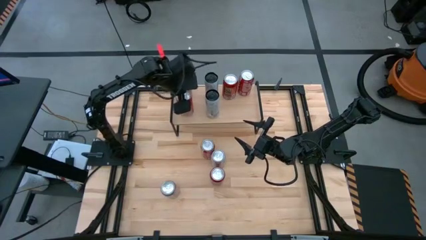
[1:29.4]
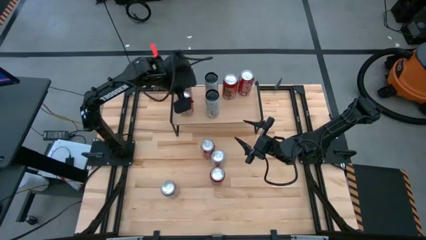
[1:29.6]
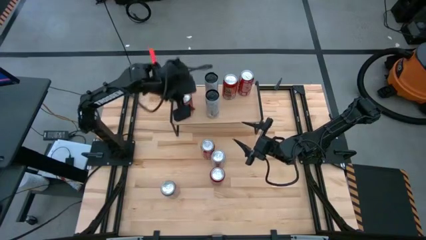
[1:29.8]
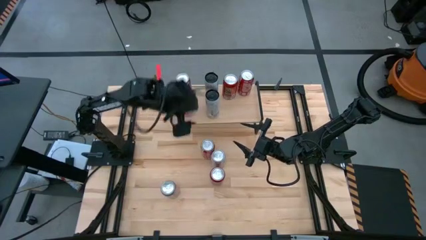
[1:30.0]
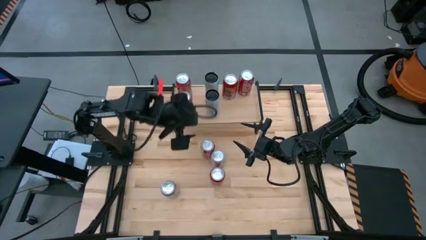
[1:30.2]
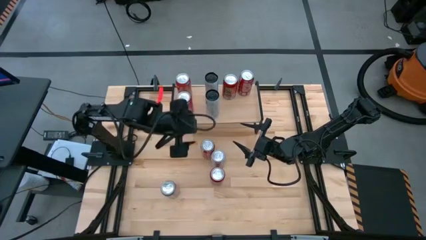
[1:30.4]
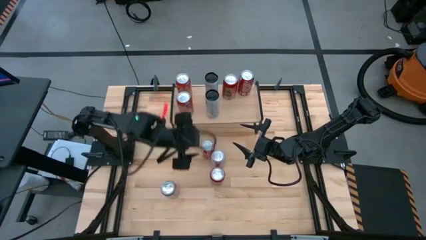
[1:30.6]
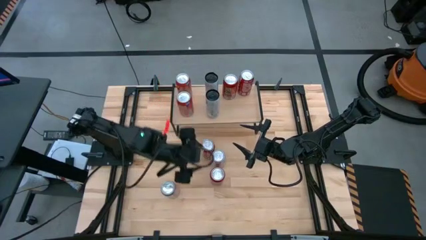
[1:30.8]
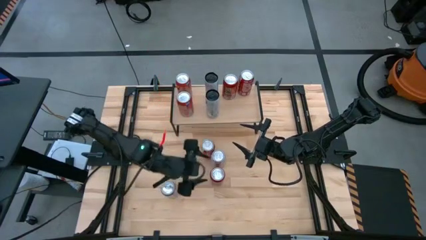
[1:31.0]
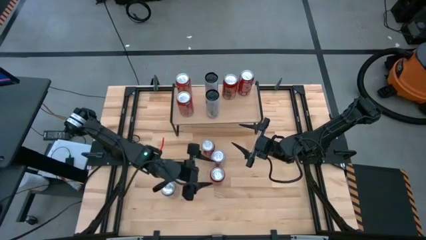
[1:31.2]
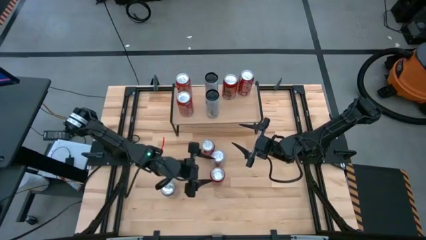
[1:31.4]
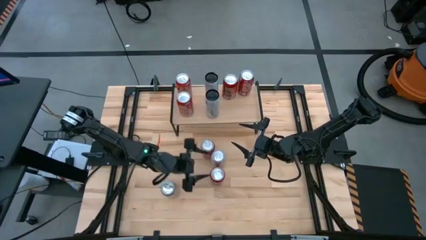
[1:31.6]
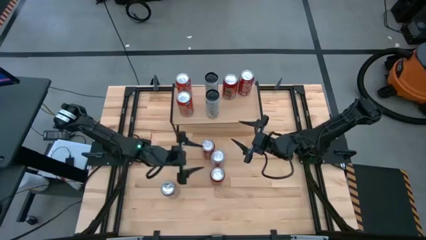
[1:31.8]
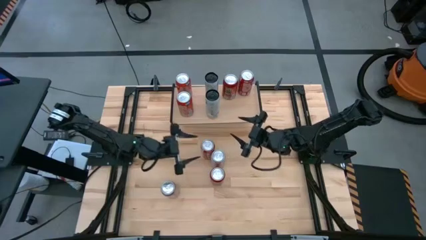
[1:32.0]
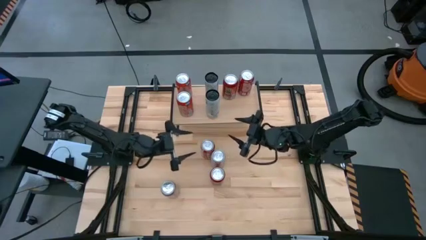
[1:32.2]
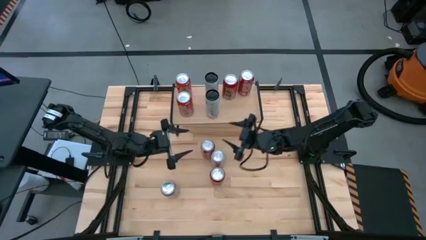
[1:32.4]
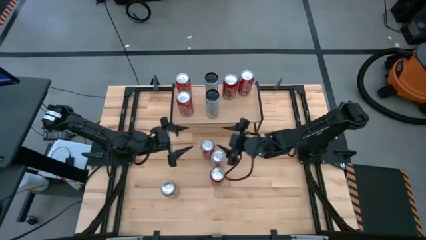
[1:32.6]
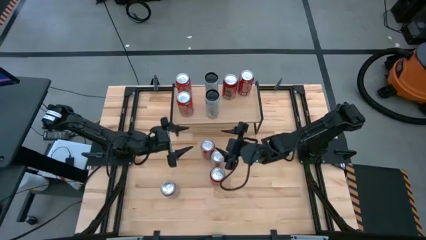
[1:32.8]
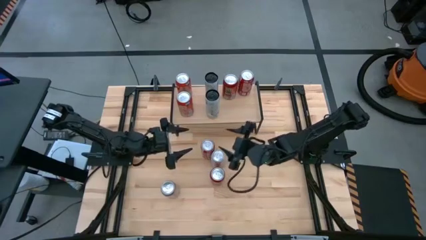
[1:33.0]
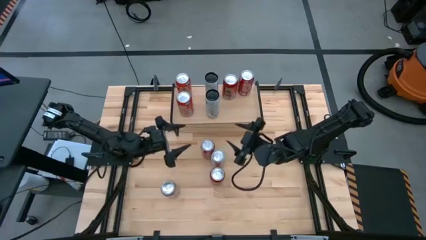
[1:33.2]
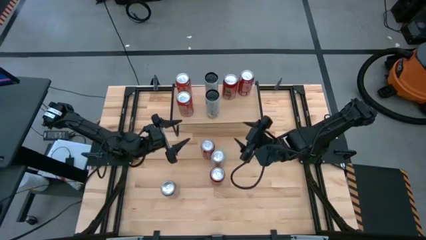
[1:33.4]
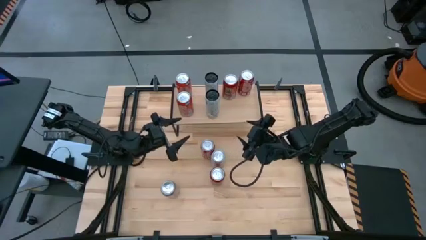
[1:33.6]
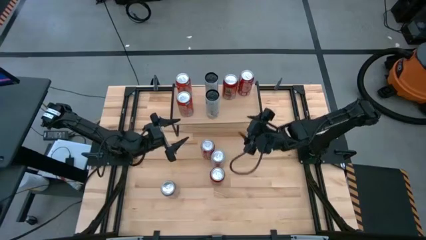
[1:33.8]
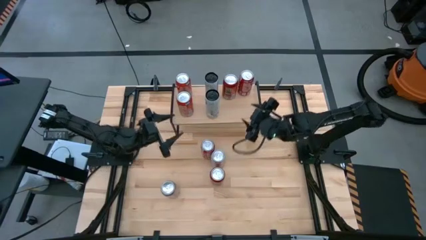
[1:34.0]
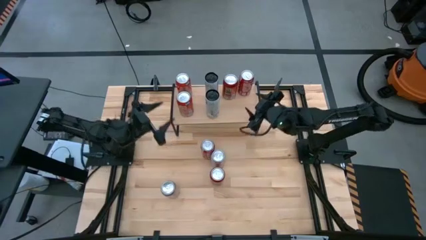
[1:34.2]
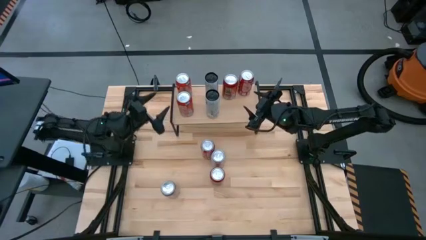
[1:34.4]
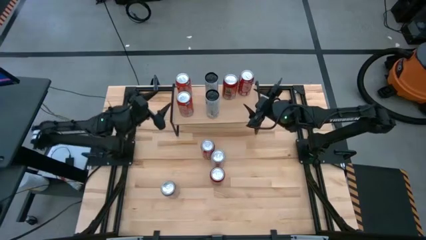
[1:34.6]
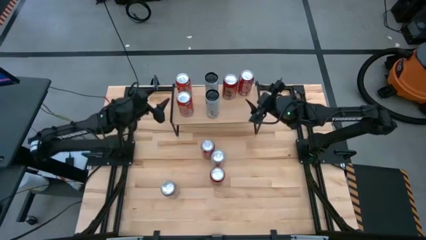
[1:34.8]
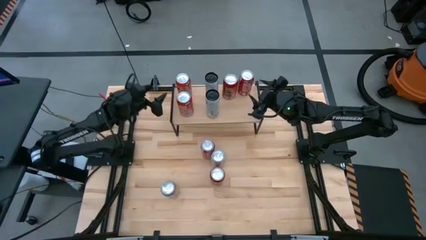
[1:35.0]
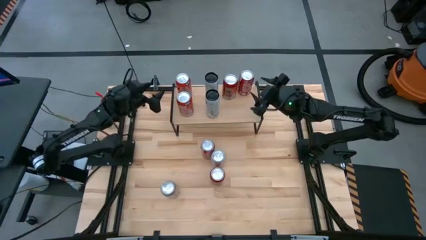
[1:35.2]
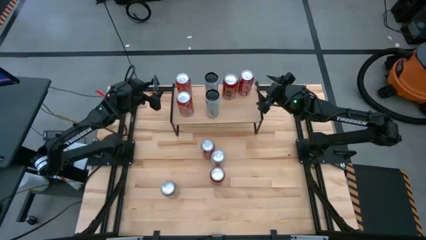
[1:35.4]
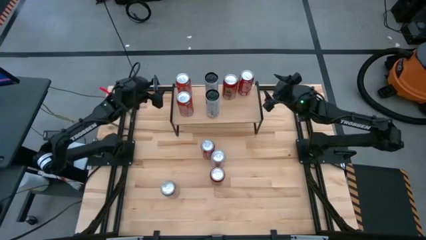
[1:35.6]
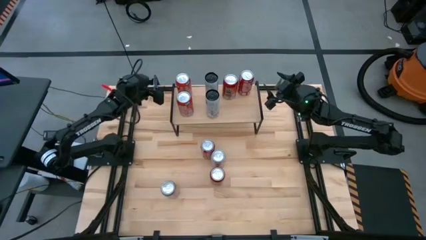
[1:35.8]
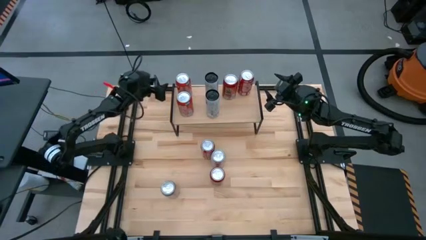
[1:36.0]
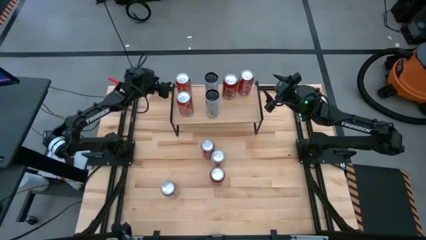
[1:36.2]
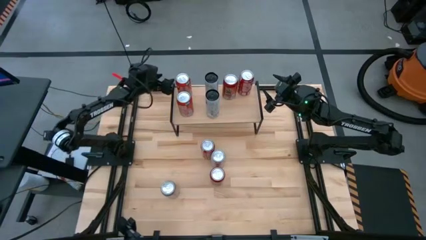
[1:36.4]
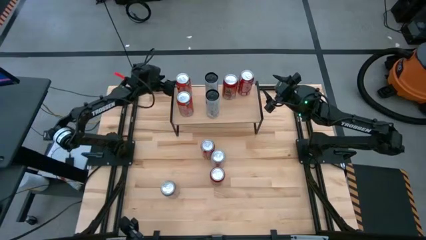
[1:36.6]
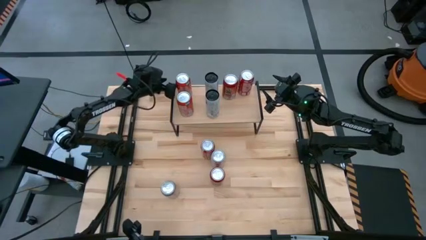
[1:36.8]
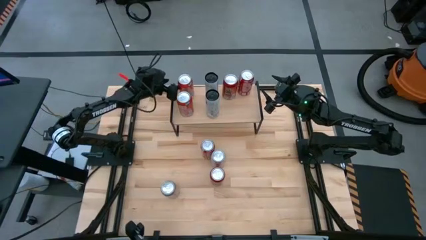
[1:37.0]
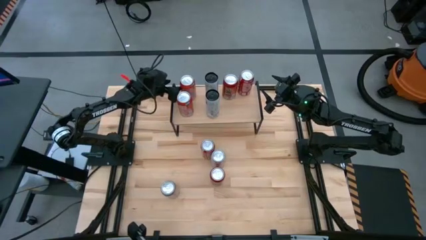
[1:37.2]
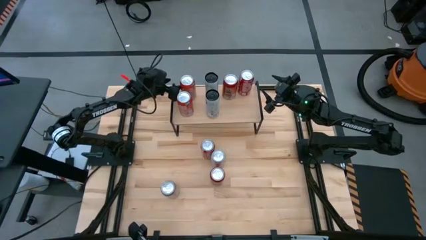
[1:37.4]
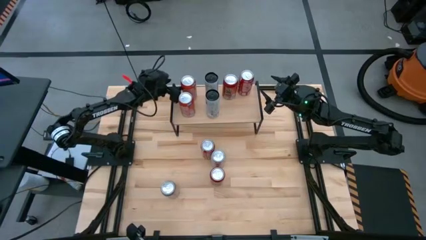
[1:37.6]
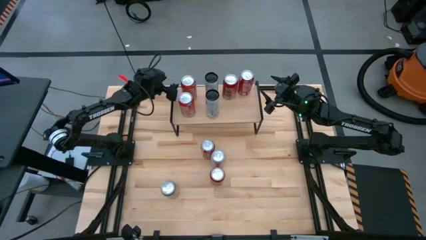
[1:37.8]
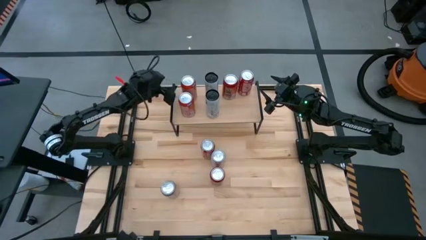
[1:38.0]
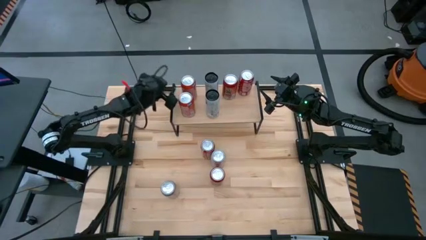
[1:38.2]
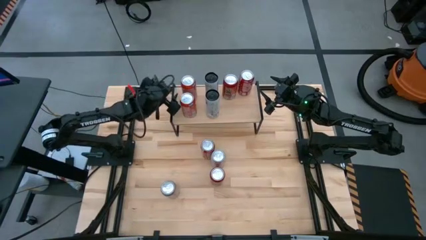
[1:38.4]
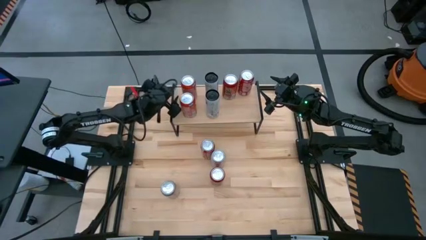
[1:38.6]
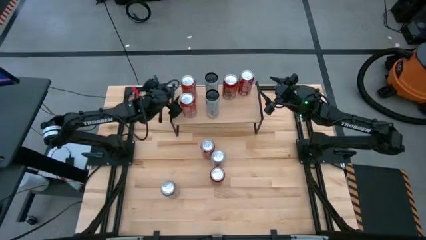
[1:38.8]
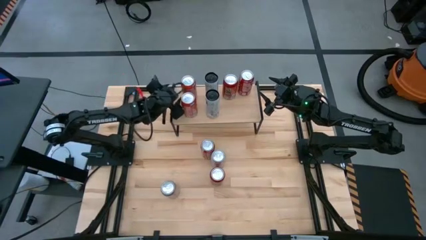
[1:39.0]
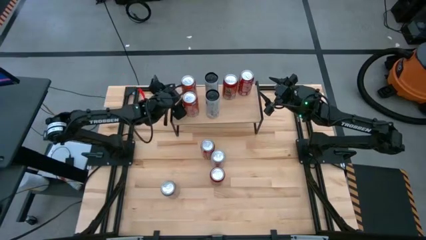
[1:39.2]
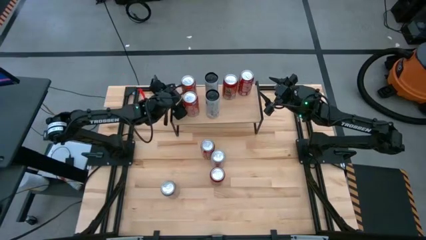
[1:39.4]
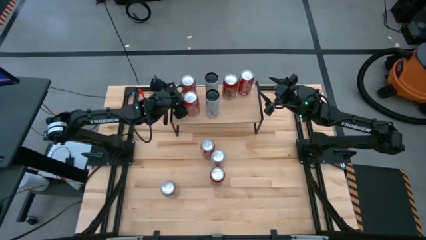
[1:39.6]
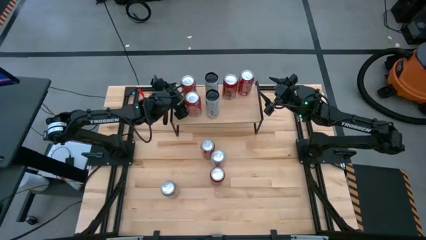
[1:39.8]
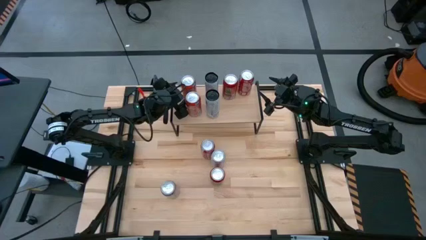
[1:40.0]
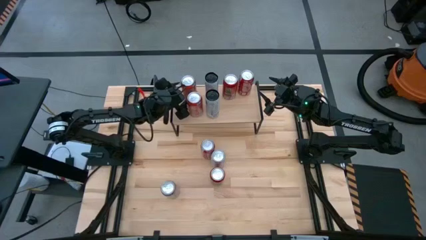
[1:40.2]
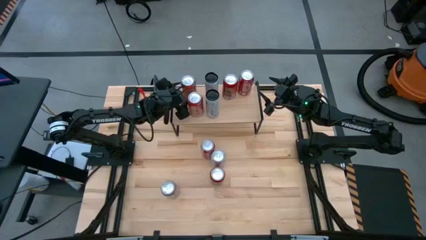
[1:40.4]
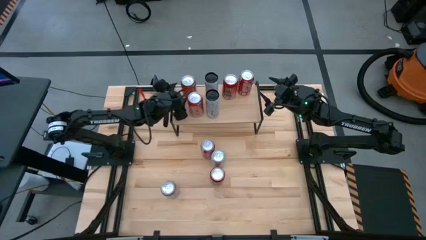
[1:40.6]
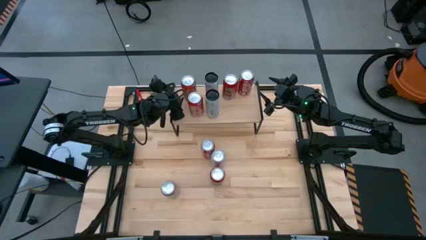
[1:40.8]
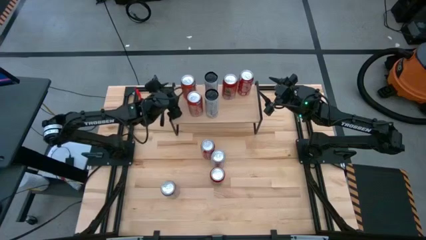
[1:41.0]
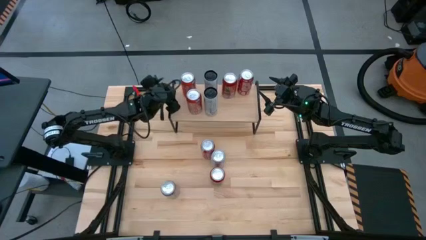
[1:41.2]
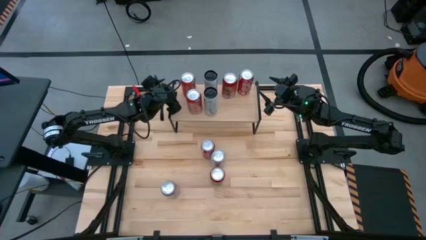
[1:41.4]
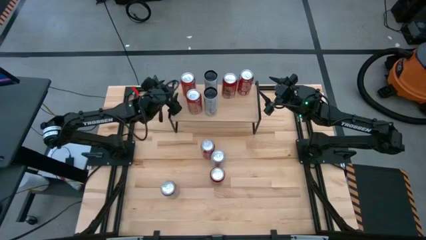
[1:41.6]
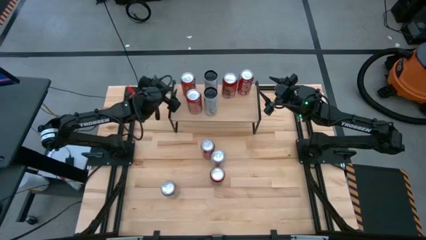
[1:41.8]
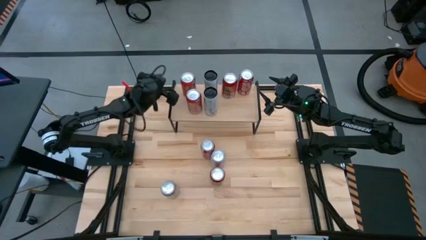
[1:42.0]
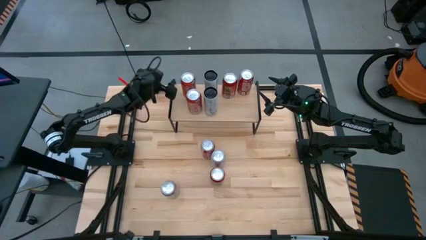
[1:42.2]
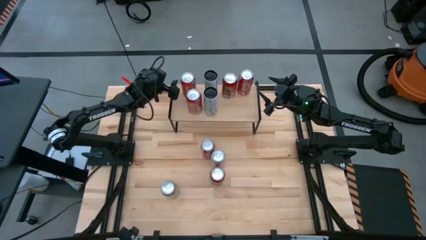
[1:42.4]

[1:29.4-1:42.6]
Task: Place canned beverage on shelf
Adjust the soda cans

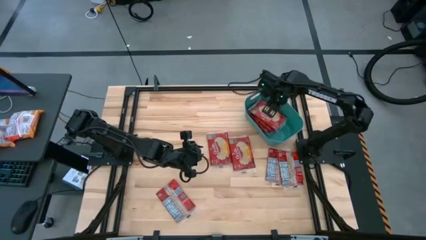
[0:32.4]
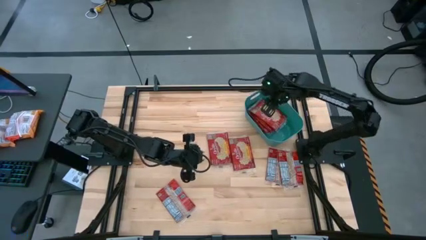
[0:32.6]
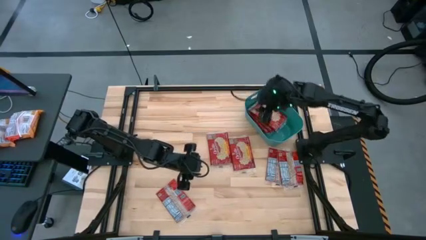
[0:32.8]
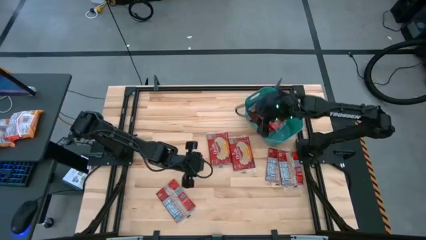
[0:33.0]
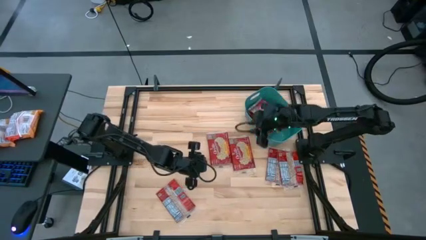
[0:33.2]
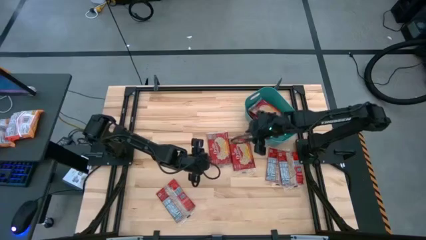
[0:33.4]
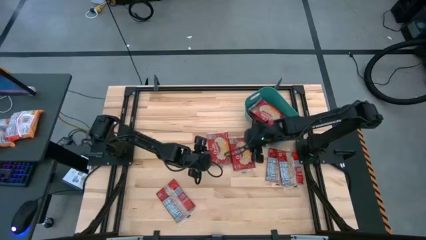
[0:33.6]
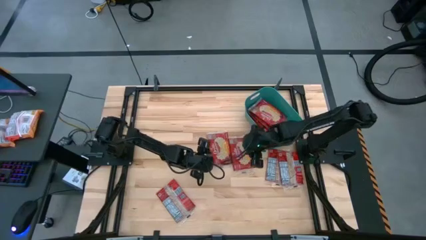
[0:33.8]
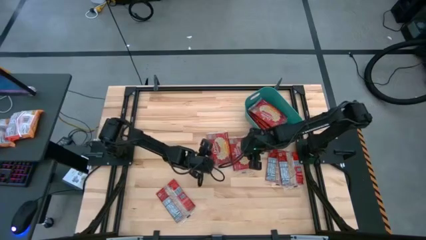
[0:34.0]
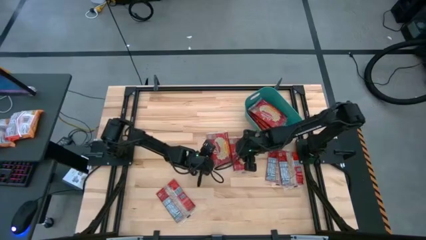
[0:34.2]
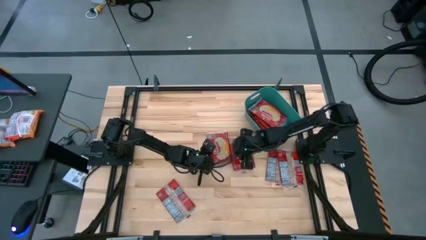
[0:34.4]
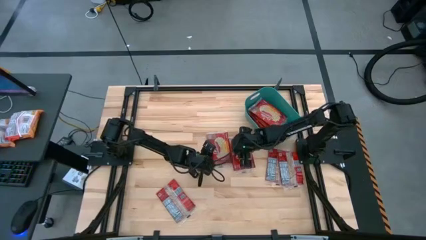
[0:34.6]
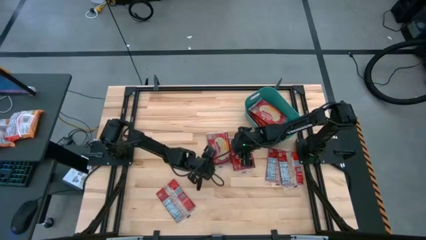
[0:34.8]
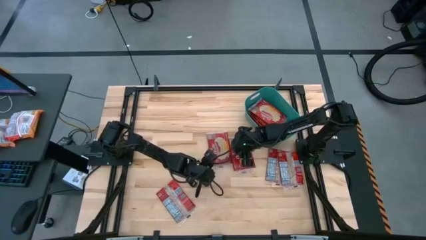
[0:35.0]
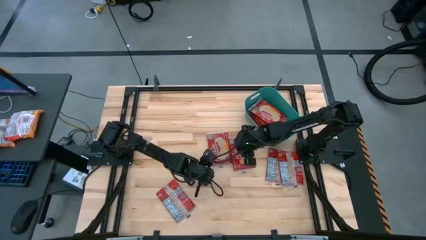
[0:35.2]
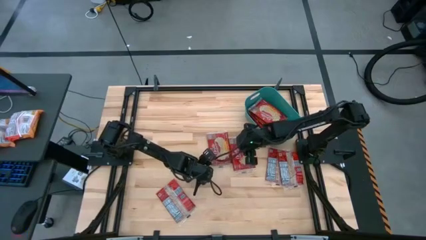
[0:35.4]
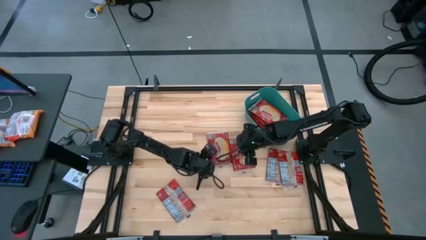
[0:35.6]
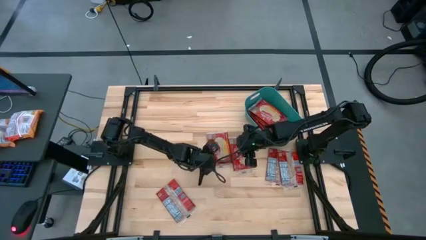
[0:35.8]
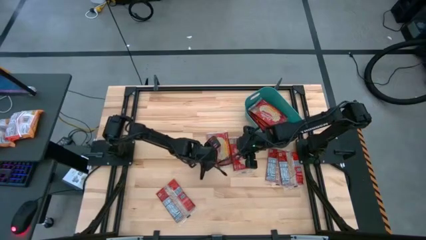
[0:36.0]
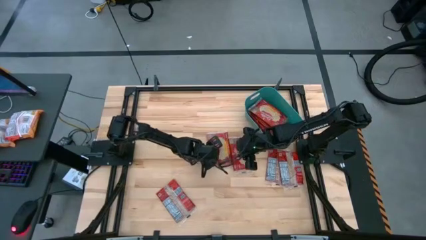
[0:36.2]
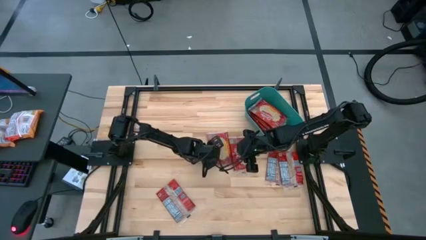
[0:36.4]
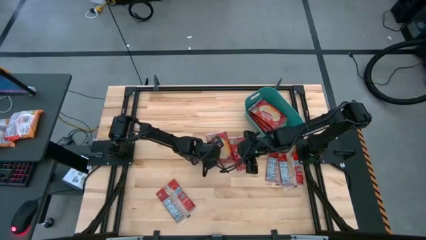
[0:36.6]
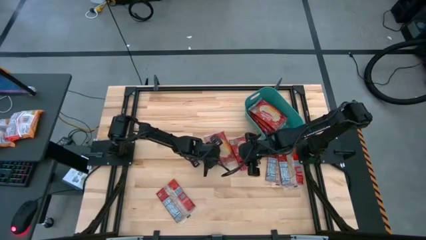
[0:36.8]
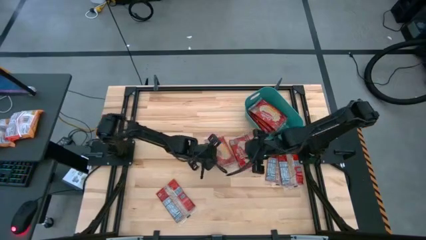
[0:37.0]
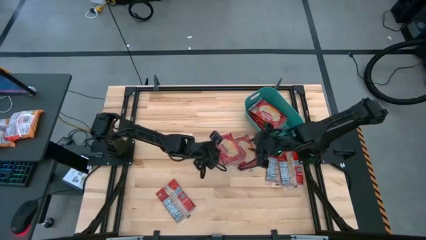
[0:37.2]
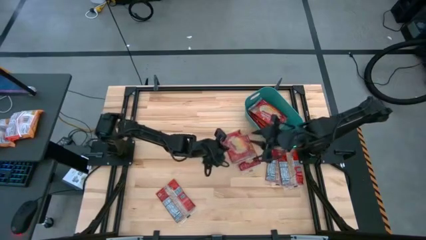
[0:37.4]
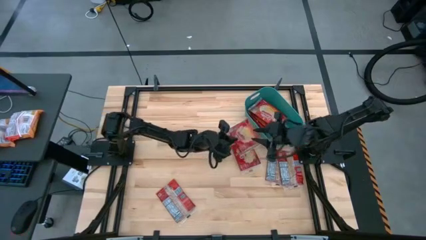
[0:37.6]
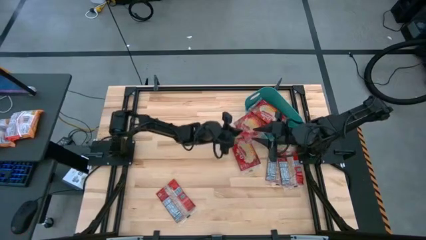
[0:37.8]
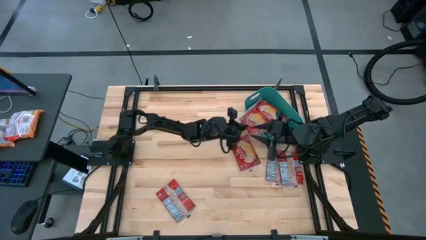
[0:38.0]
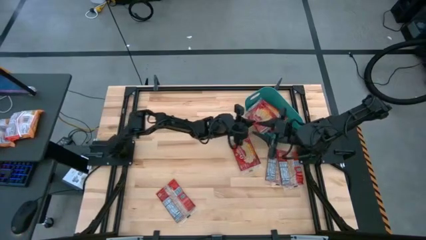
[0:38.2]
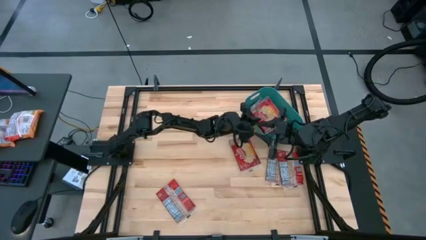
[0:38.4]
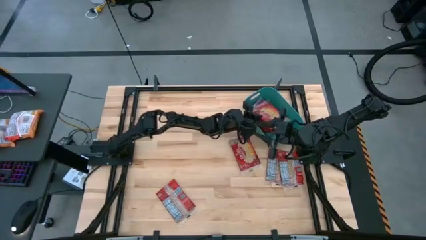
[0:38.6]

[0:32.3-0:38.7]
Task: Sort popcorn bags into baskets
Put the red popcorn bag into the green bin
